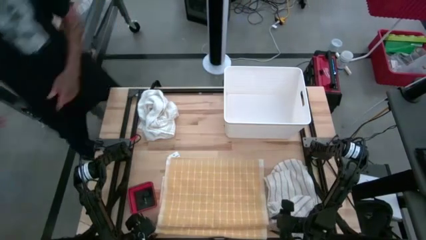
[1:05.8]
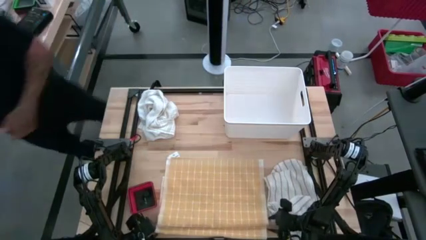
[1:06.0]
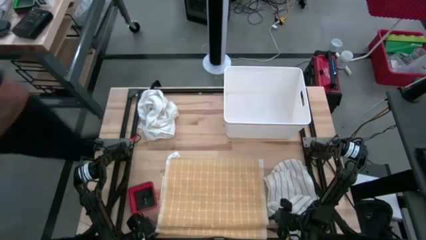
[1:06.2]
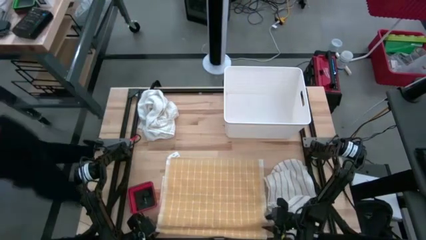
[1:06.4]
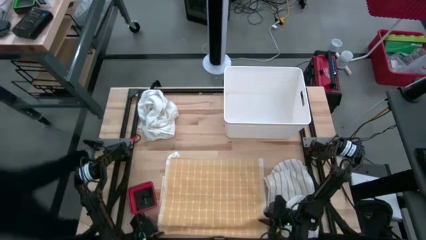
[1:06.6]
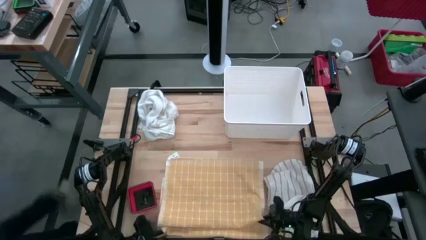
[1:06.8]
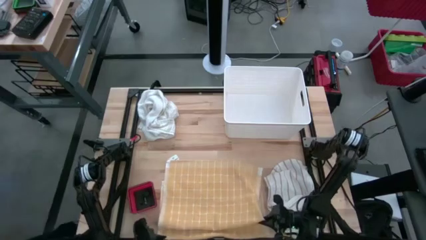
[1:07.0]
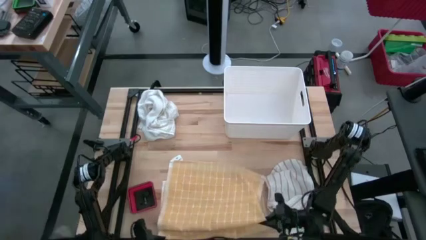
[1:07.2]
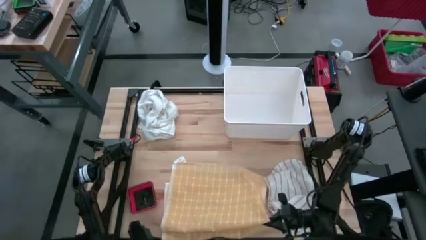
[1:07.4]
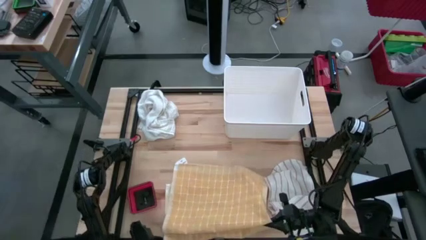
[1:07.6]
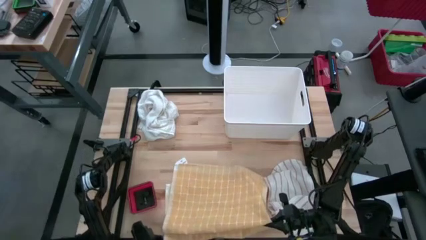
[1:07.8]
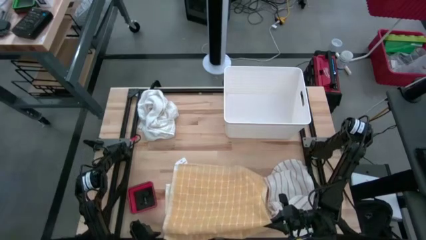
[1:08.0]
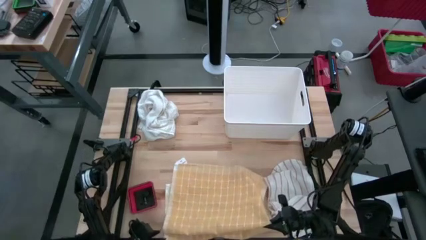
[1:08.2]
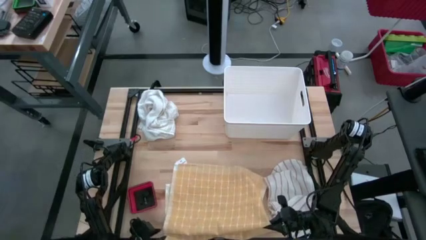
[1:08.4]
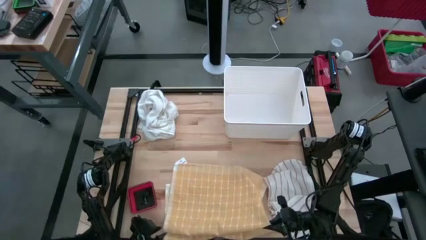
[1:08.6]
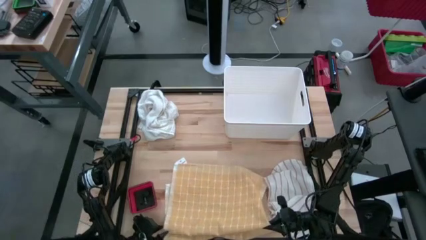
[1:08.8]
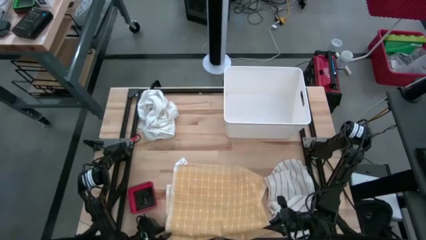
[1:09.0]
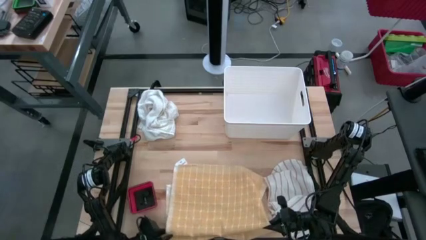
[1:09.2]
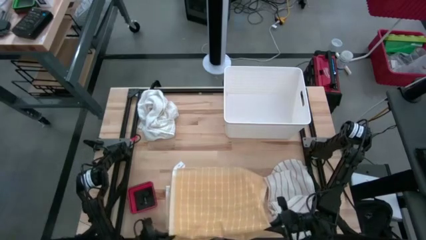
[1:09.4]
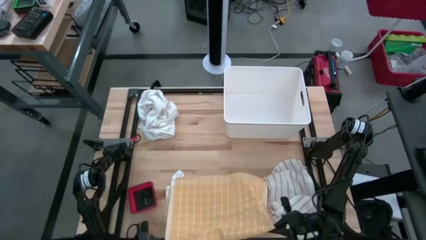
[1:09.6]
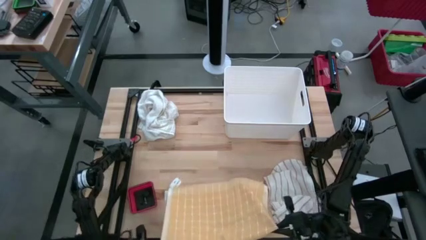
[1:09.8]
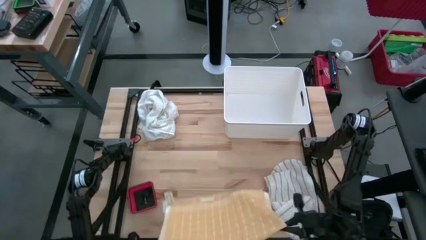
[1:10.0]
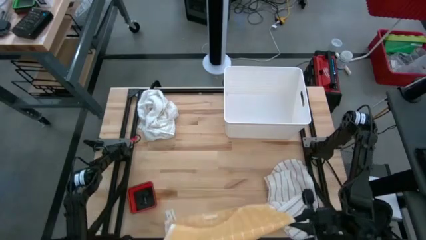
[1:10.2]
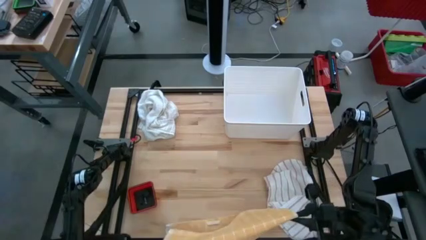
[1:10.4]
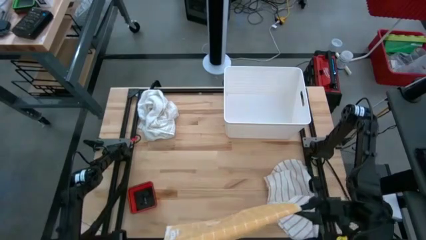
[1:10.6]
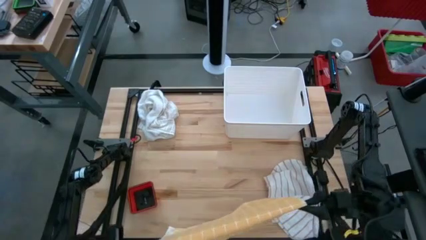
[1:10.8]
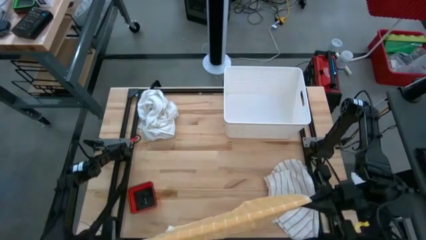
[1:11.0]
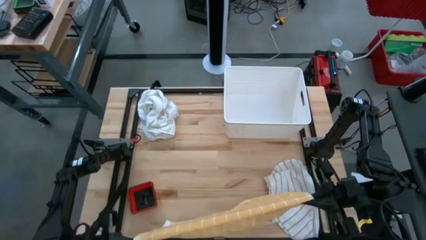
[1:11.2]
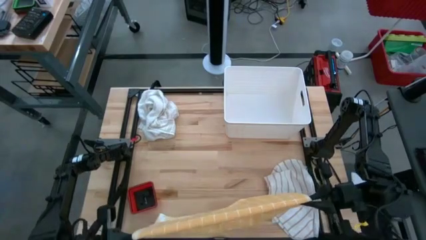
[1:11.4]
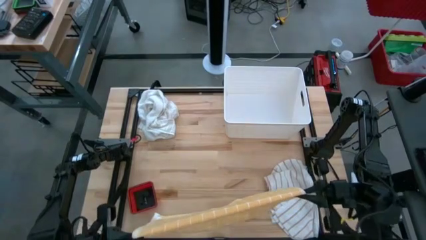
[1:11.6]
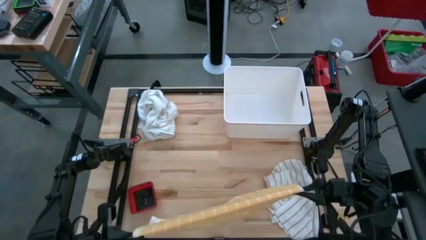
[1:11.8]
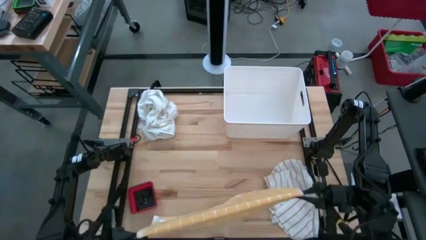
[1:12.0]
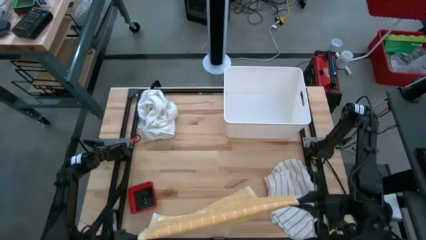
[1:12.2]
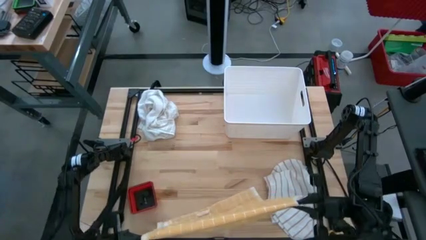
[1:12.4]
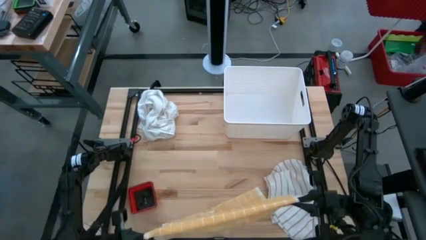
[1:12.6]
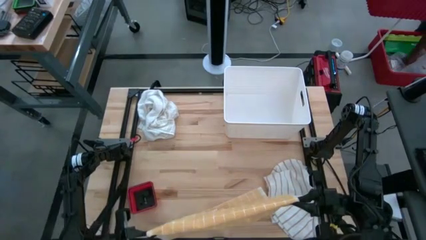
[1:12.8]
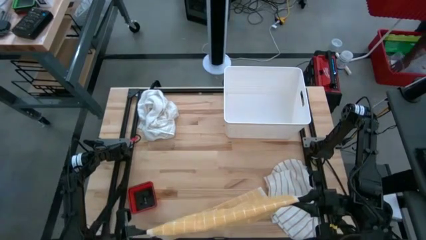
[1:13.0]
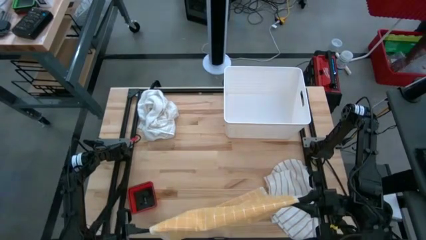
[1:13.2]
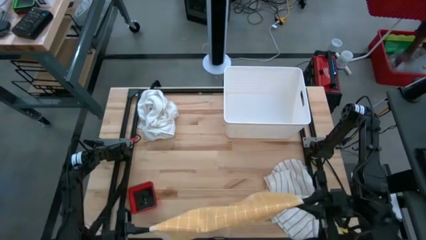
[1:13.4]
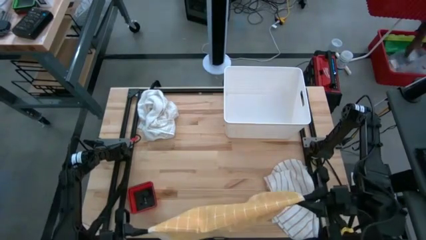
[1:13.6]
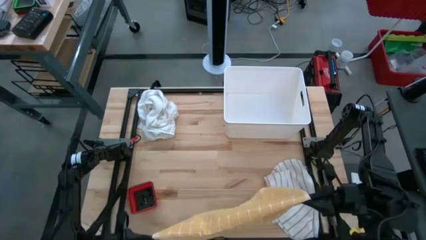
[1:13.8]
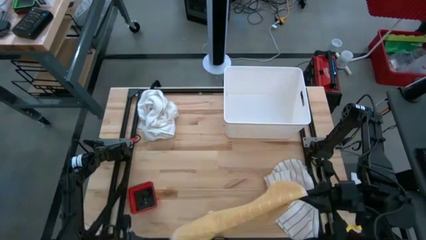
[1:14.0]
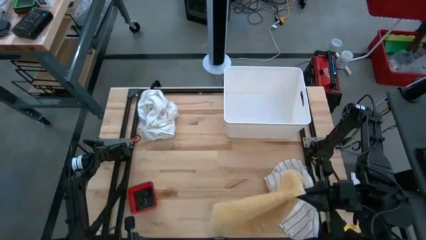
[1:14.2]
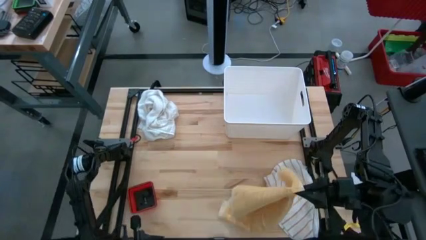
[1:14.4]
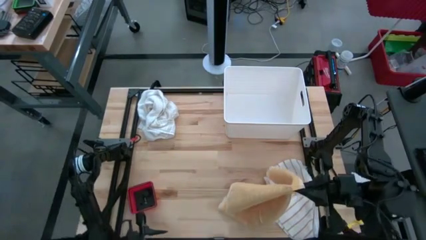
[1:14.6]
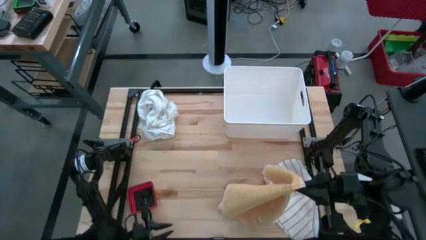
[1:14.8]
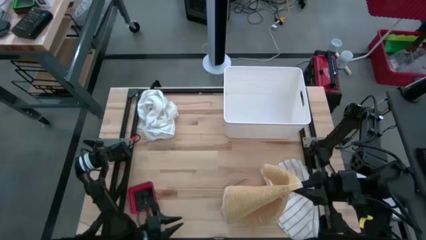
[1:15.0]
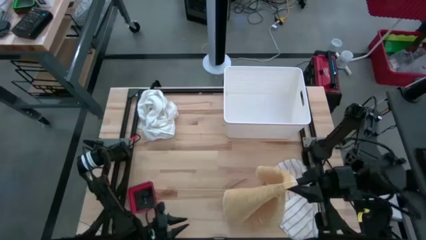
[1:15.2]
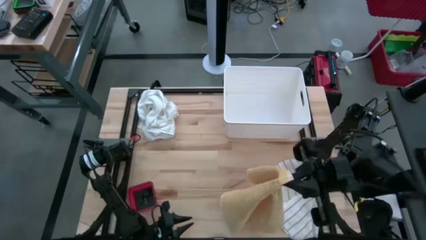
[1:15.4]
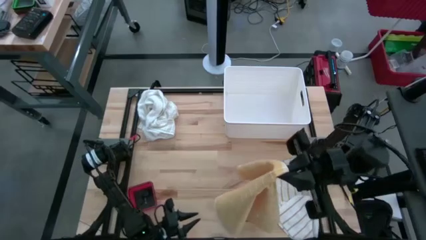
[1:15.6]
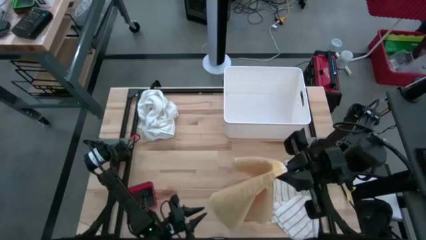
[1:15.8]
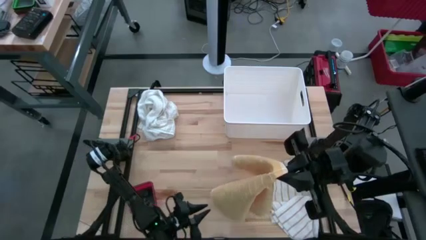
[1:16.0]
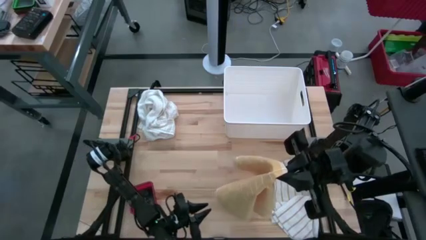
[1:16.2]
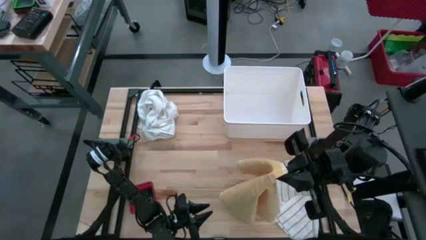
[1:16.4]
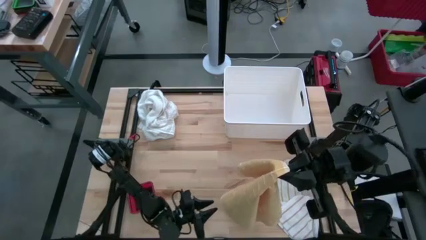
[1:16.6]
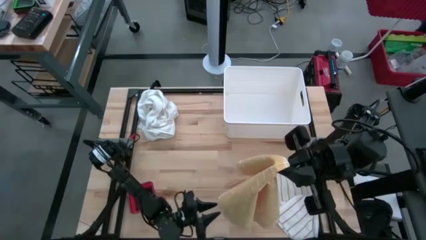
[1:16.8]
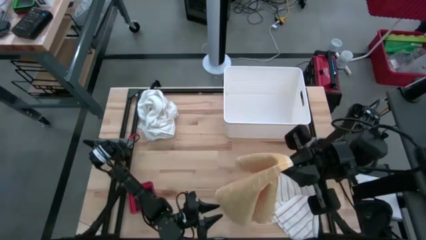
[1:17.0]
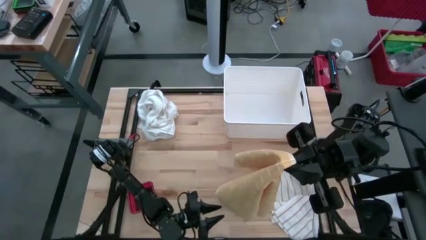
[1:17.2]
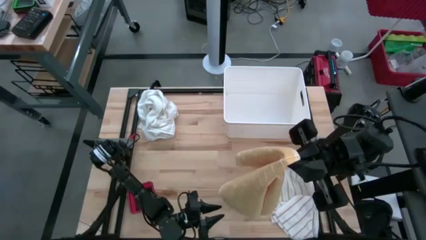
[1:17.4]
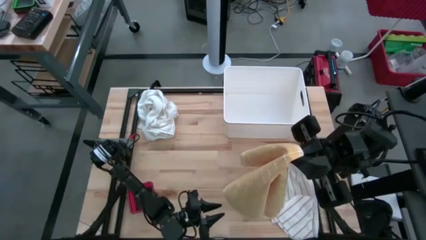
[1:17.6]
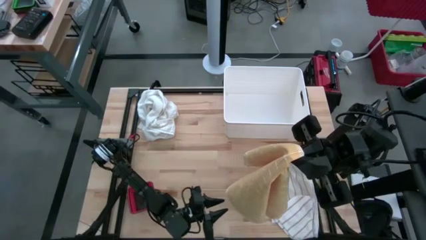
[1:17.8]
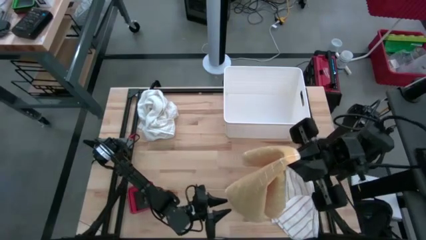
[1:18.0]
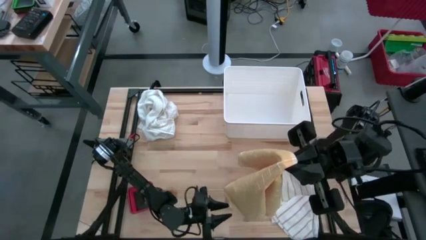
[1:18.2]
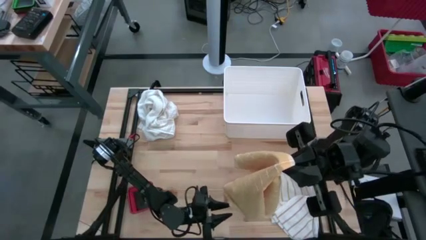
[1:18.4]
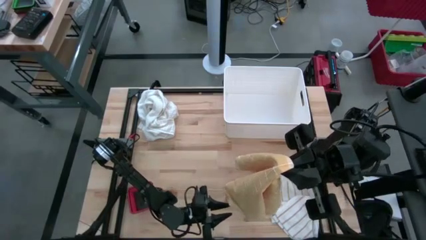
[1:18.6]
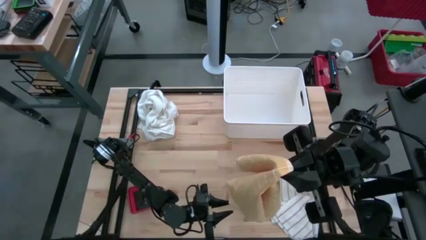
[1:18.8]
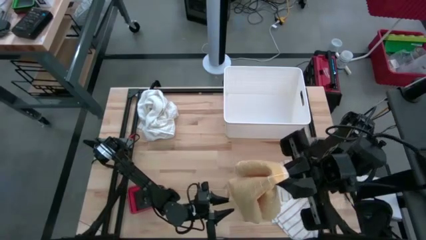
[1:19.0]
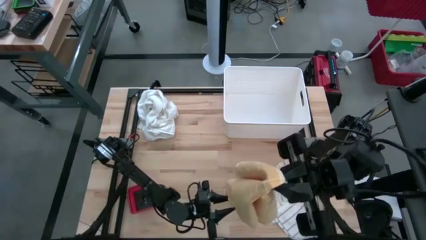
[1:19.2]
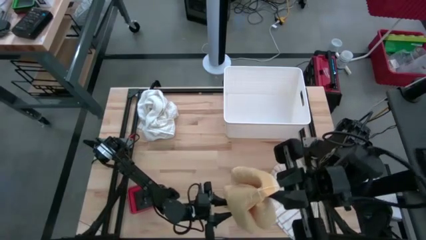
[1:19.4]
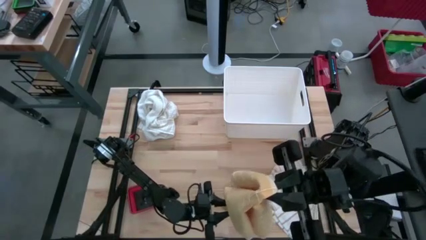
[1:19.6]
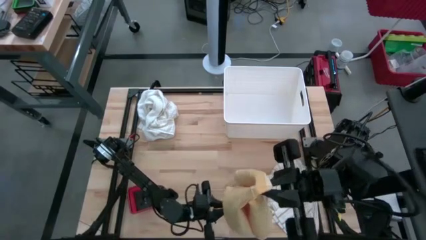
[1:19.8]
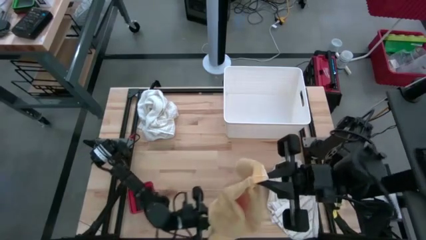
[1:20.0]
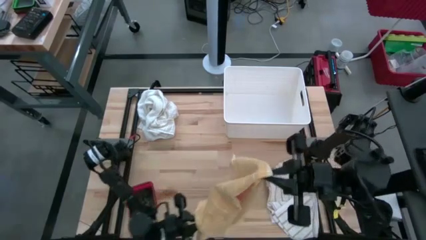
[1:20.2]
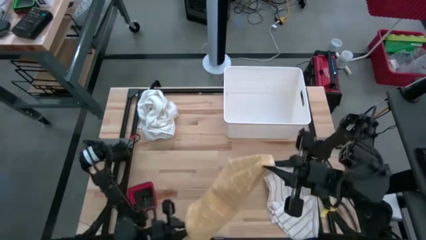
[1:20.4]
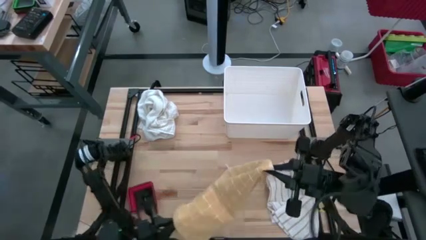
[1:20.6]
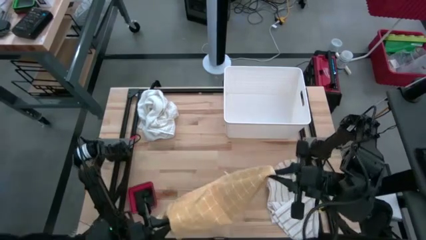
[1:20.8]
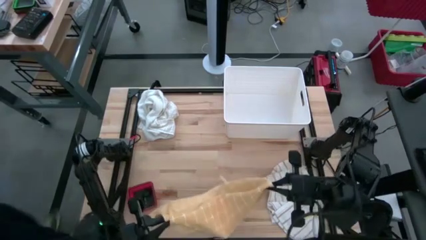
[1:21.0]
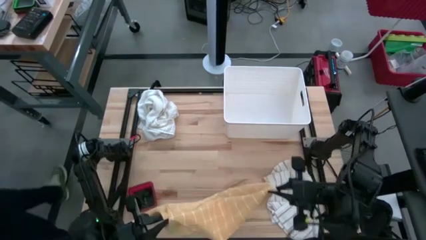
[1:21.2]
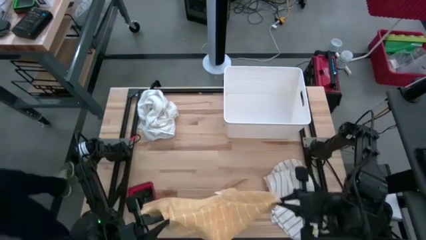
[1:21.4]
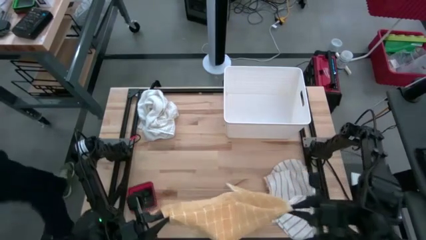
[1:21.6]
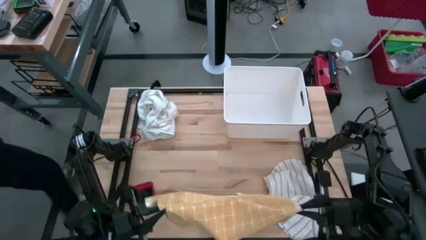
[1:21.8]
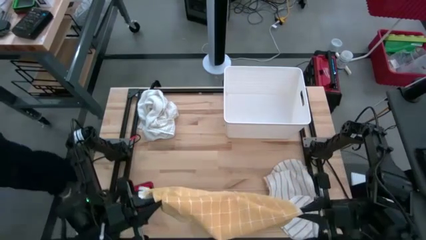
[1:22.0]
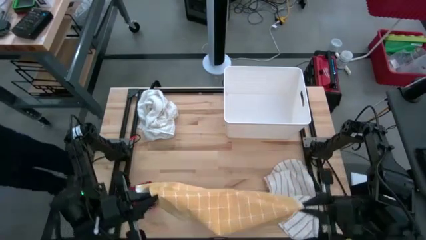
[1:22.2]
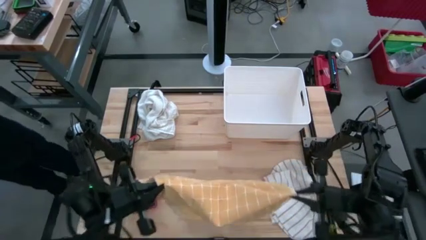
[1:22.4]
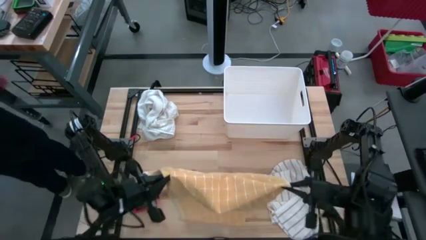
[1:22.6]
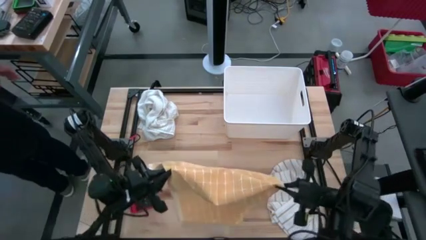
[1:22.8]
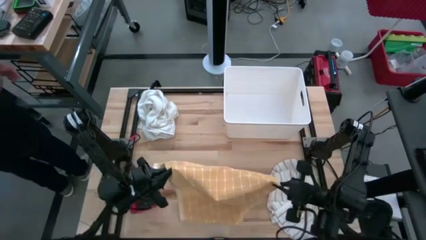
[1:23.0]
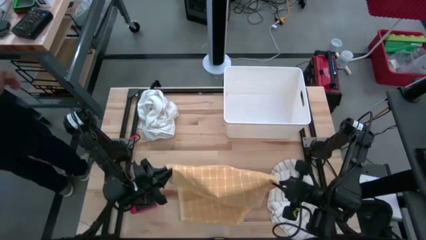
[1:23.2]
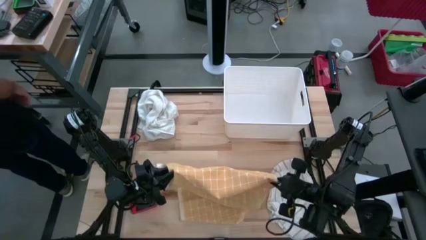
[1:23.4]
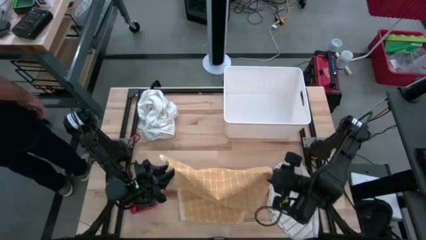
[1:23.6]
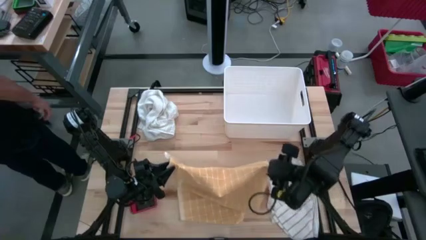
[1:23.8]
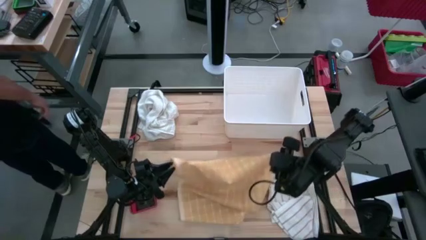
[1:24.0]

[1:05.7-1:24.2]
Task: Fold towel
Fold the yellow kitchen towel
